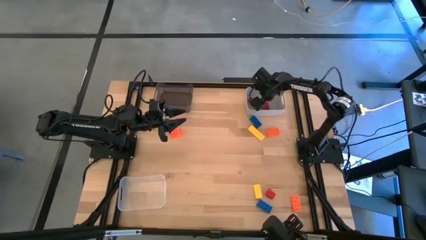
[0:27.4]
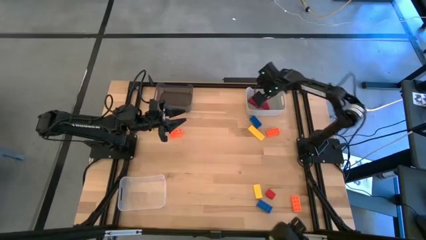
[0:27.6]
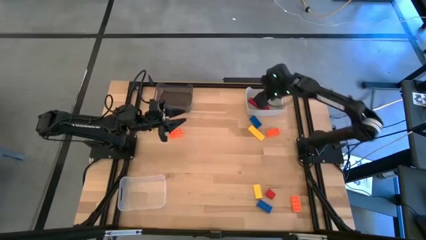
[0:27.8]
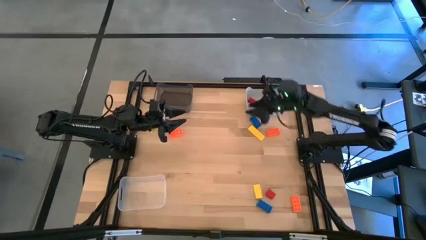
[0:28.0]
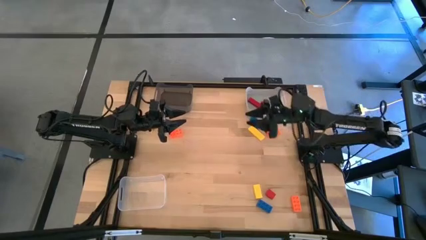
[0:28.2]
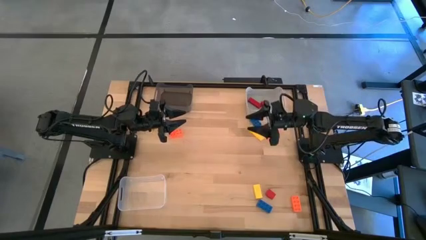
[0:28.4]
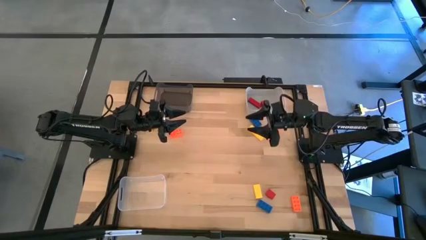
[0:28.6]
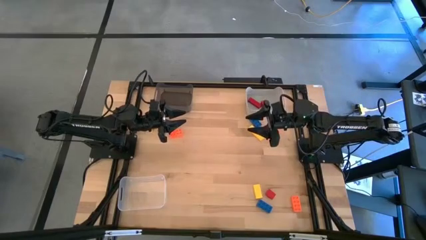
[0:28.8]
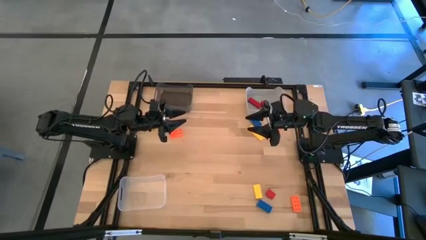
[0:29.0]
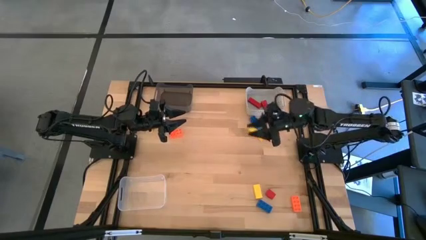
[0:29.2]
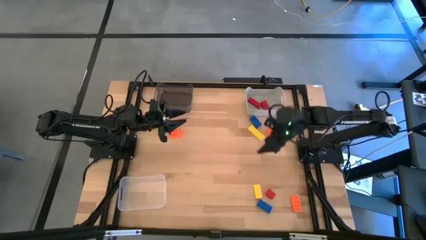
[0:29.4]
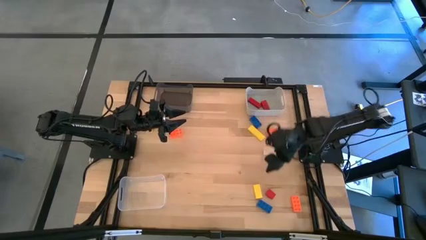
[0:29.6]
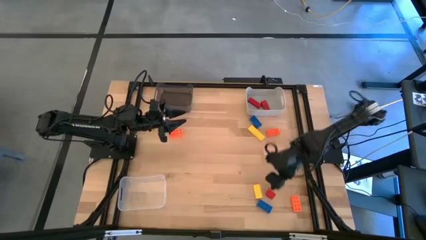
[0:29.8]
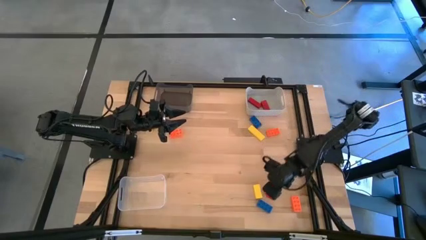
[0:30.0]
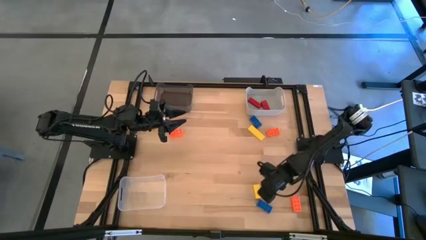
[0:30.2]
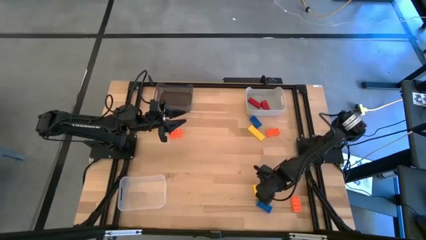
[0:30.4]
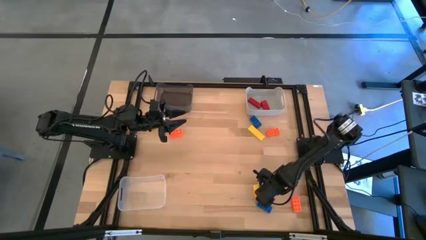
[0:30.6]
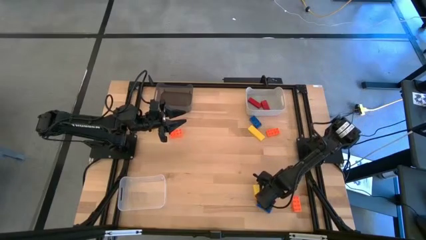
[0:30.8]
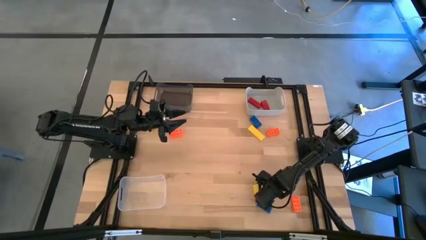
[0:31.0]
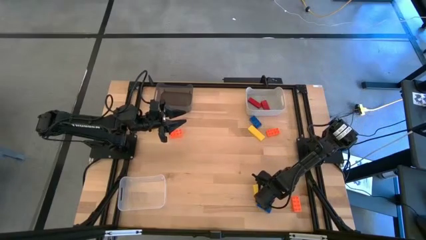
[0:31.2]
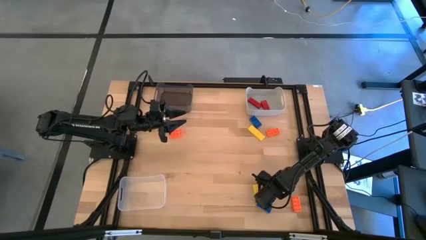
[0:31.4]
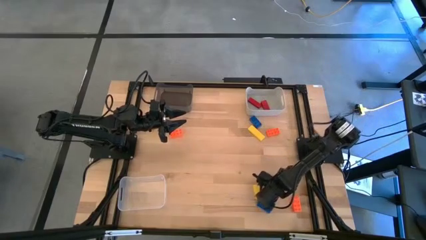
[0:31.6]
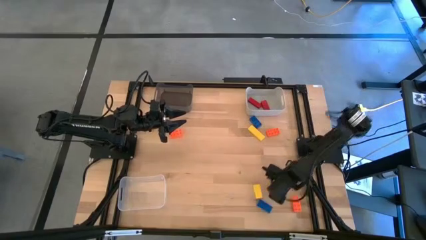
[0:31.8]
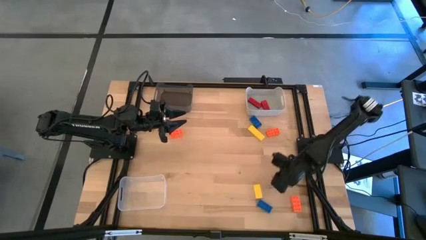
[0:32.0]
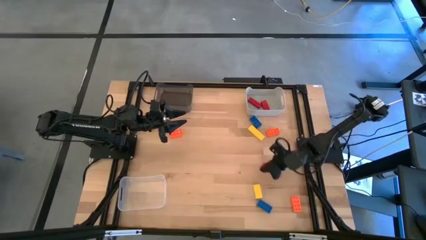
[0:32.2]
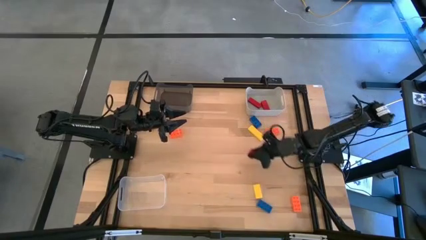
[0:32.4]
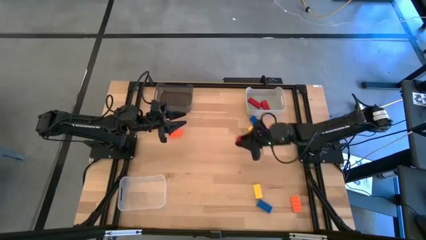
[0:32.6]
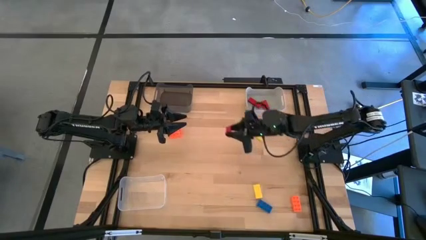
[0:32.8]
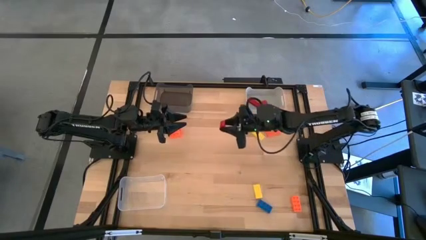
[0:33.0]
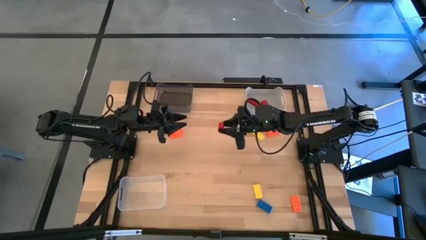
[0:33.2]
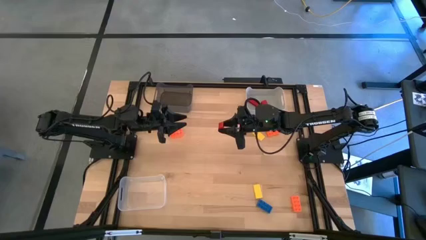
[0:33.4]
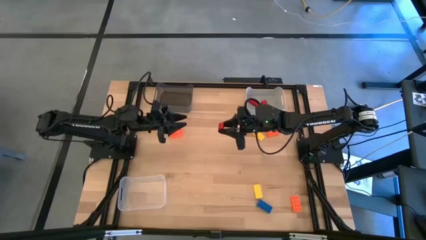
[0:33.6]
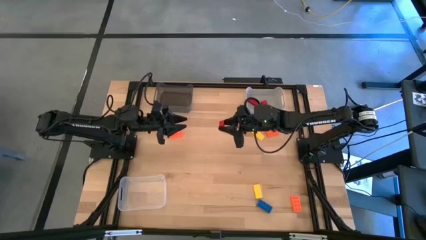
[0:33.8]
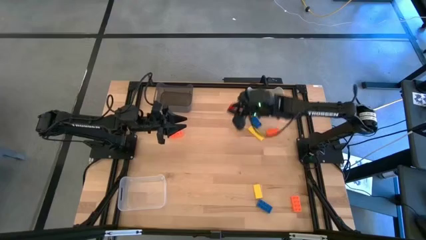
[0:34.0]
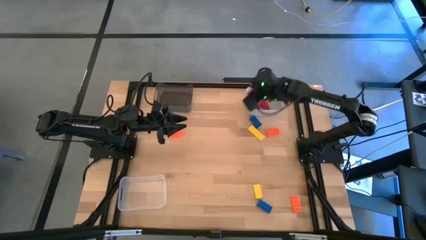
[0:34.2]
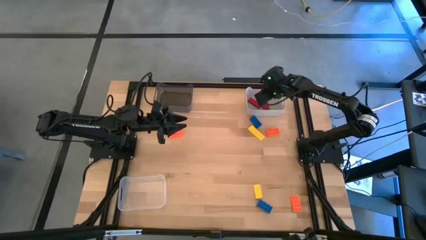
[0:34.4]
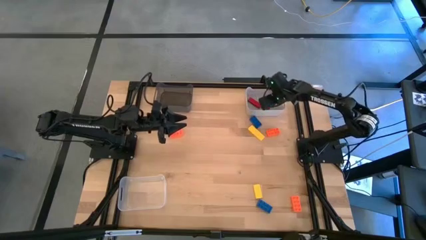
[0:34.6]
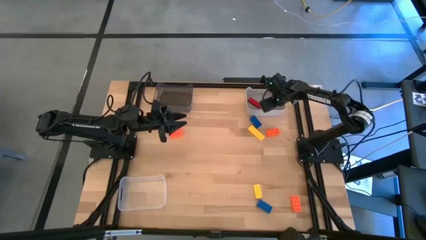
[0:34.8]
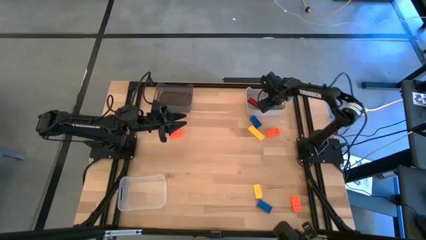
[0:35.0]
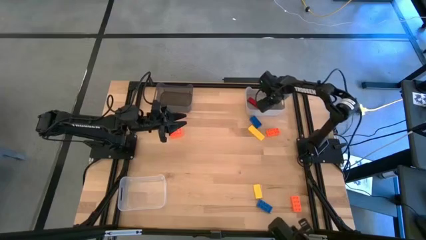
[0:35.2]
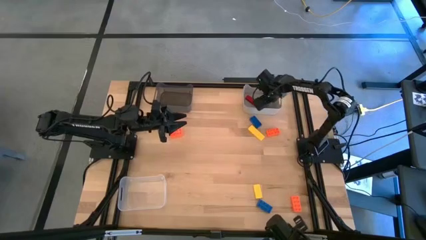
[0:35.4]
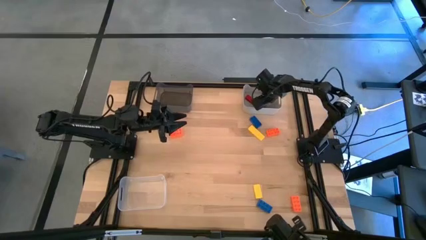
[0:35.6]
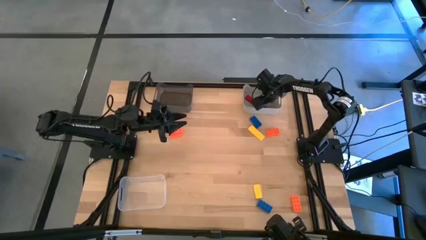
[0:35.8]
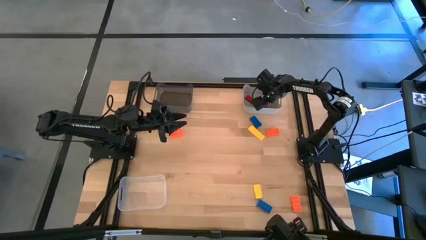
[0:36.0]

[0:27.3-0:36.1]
Task: Sort & place blocks by color
Put the red triangular block into the white bin

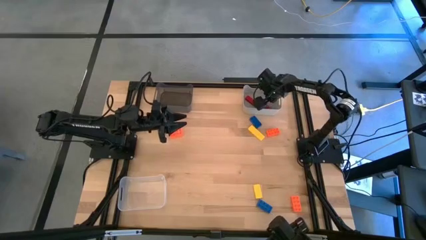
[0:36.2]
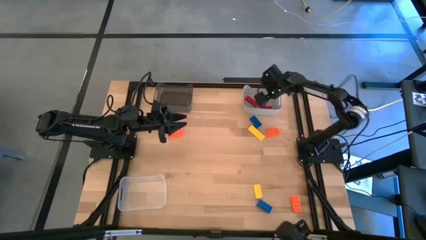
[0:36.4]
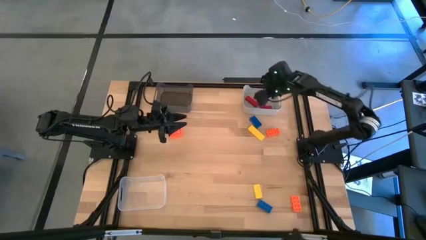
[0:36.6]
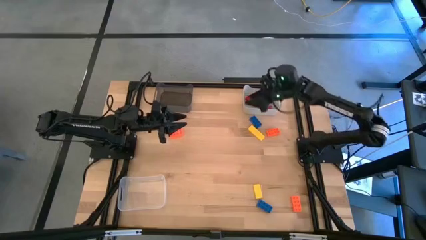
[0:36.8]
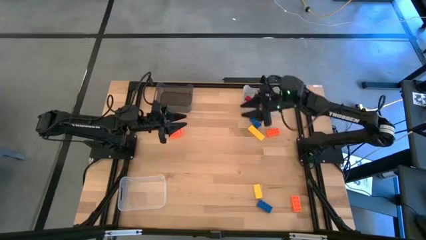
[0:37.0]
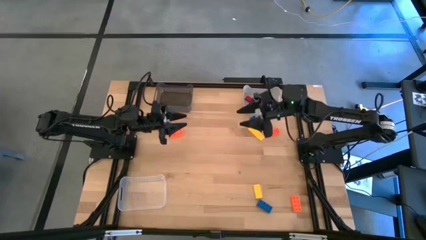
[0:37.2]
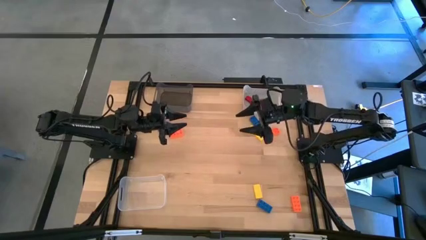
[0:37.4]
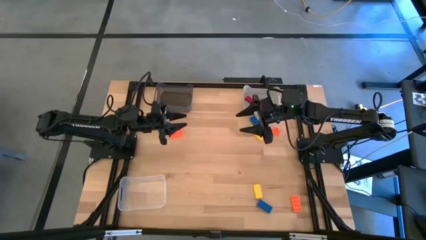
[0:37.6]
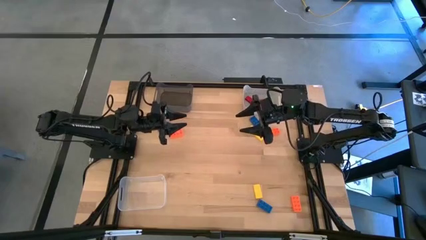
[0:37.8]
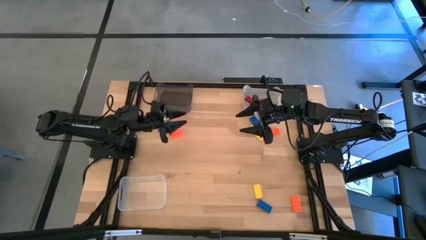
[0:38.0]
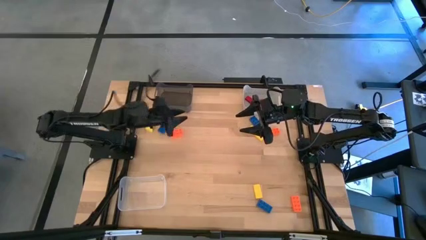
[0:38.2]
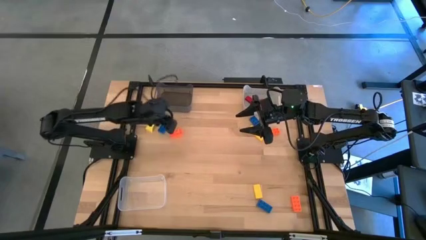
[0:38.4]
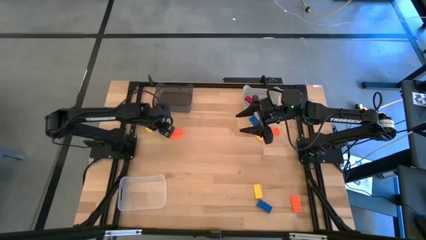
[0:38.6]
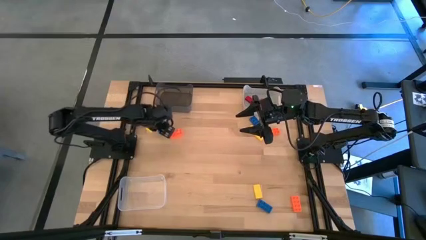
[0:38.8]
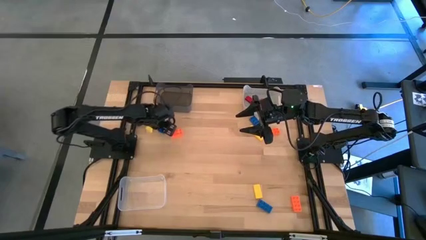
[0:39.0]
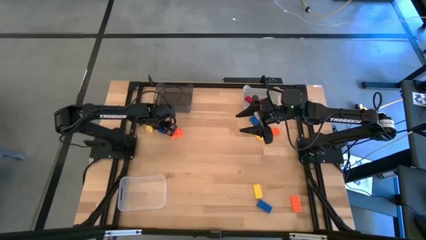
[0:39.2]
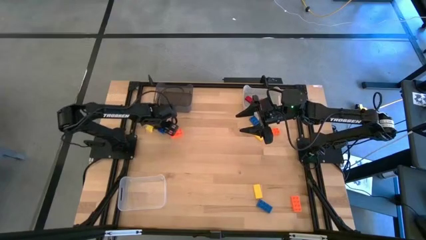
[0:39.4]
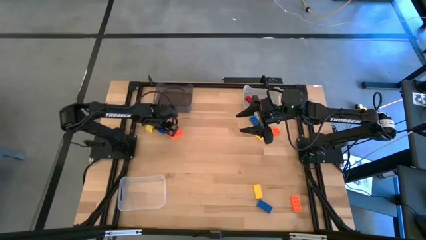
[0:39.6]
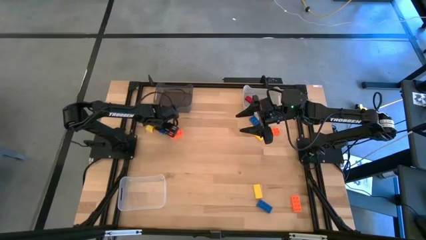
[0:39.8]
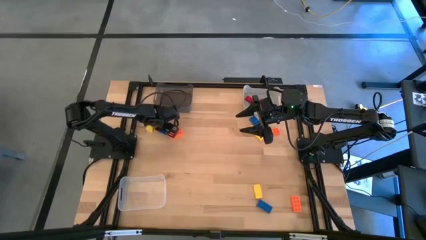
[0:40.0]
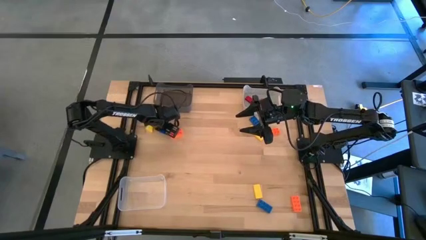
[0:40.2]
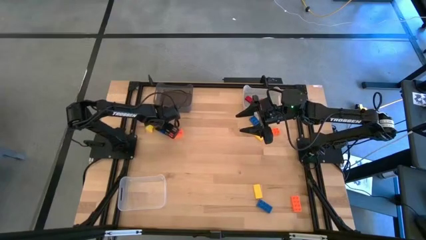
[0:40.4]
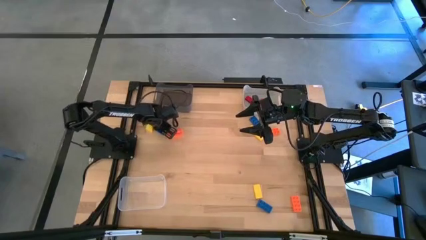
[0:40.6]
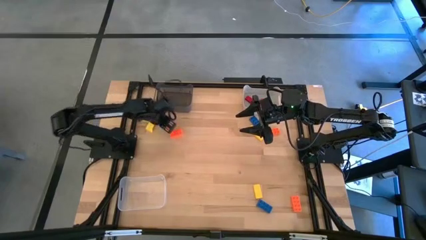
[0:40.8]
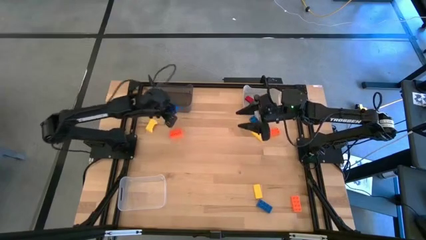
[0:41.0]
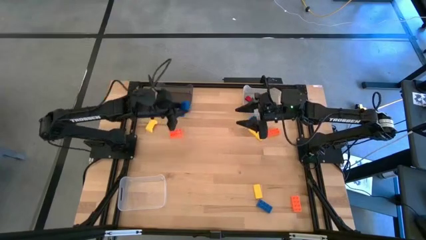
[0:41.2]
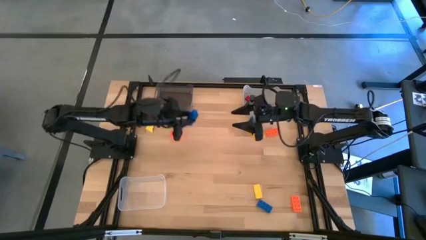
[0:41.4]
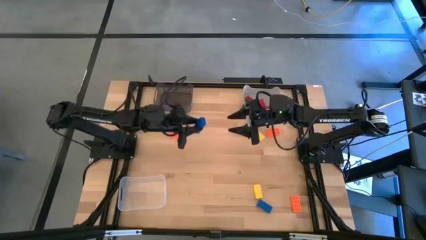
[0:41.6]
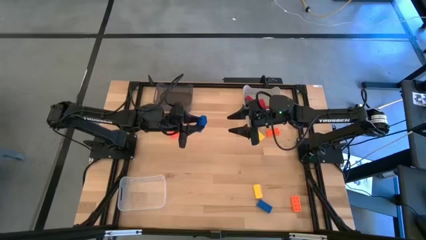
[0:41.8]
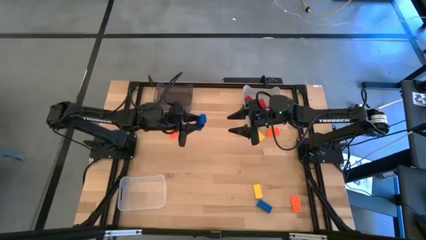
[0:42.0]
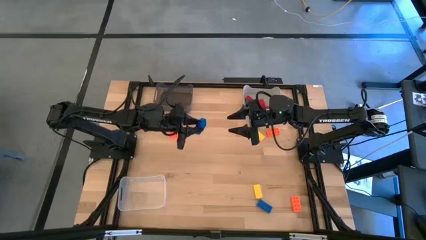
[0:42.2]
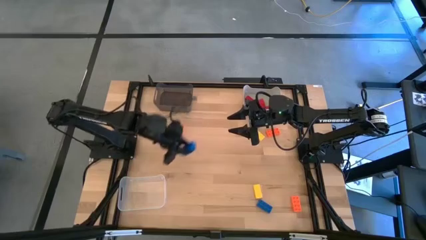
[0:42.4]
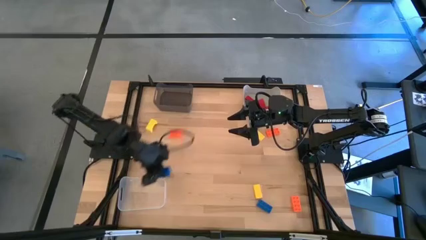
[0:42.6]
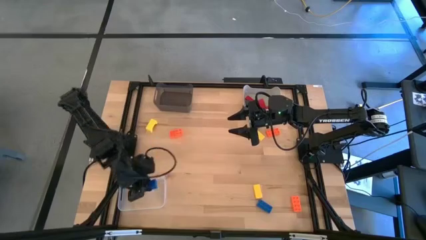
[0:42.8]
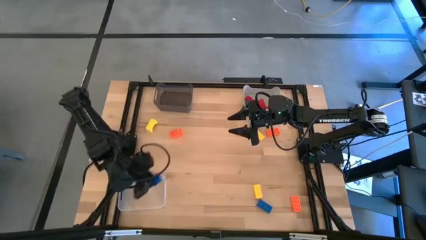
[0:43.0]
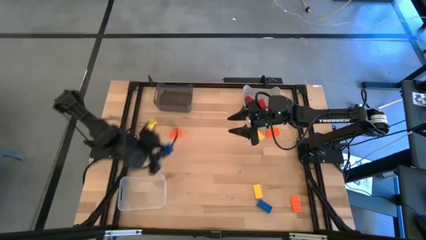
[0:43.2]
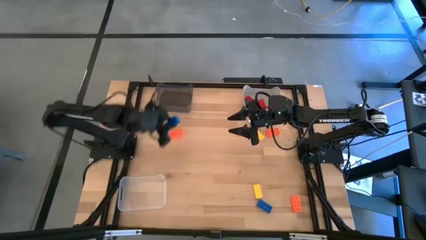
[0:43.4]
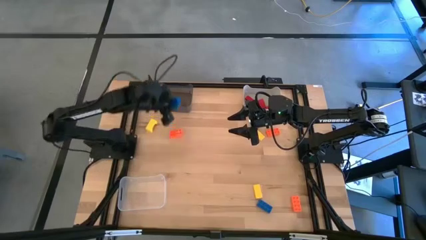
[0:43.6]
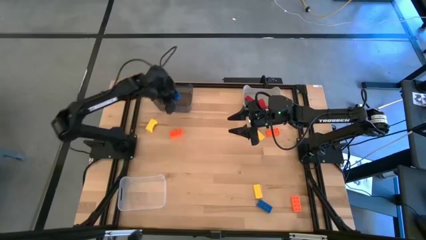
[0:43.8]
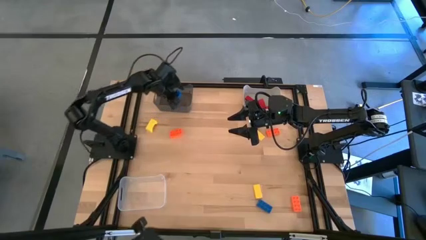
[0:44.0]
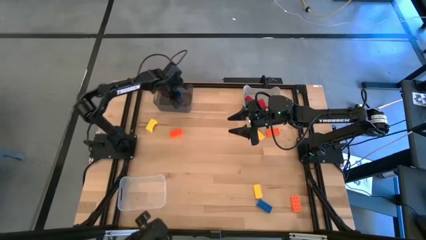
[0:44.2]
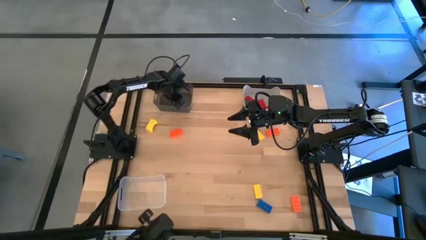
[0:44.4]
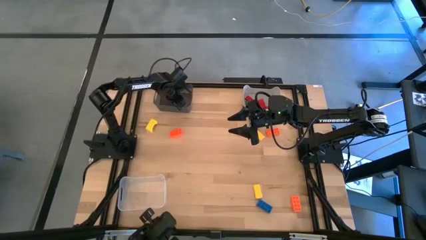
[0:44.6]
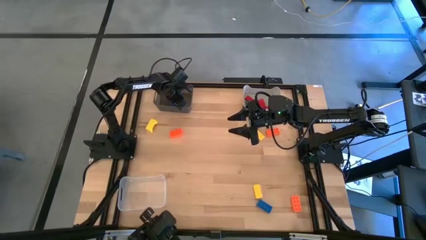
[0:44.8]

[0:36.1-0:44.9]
Put the top left blue three stud game piece into the black transparent bin
